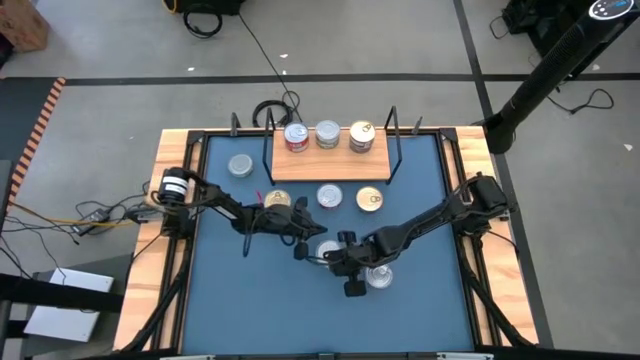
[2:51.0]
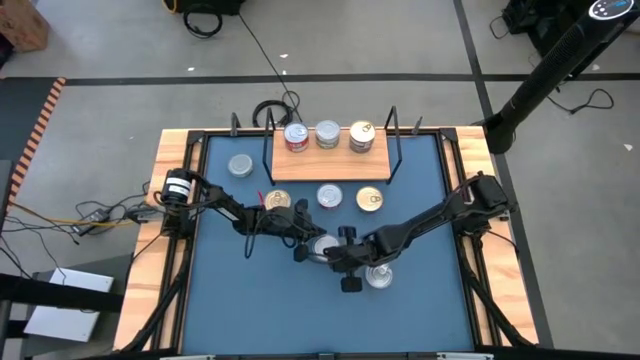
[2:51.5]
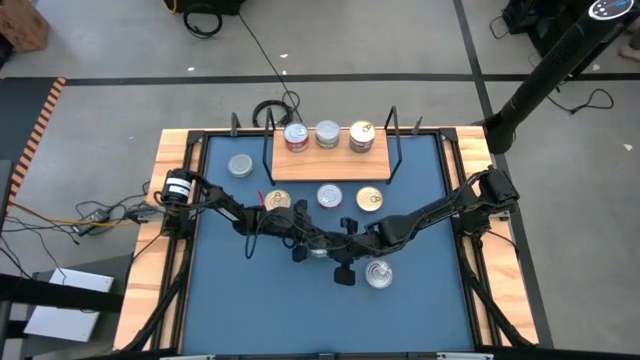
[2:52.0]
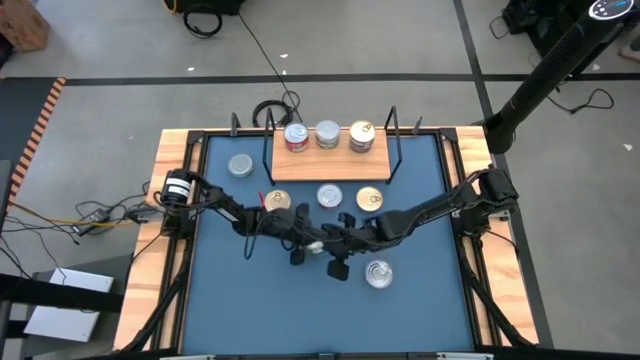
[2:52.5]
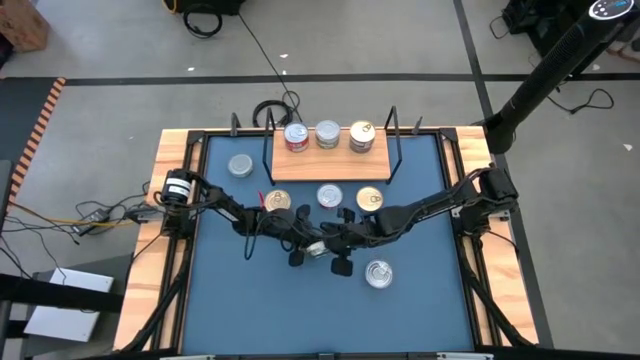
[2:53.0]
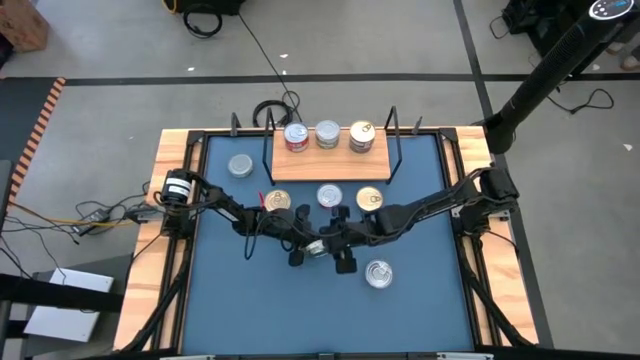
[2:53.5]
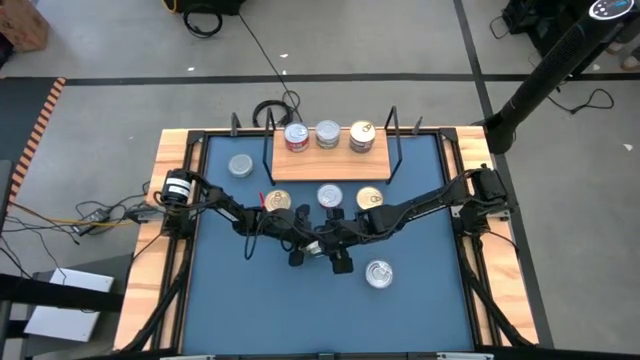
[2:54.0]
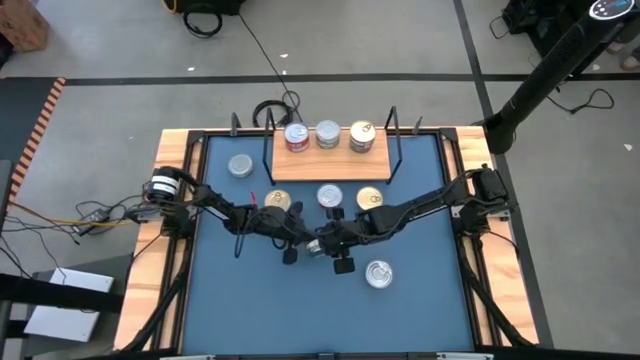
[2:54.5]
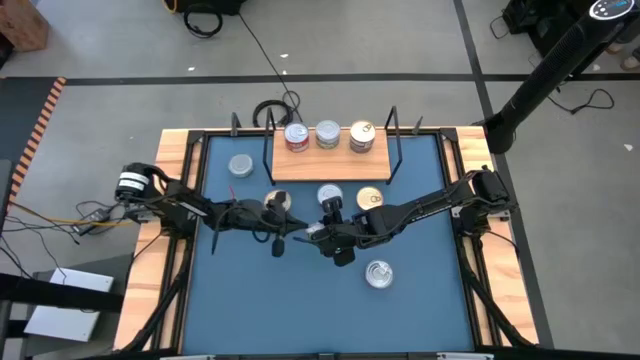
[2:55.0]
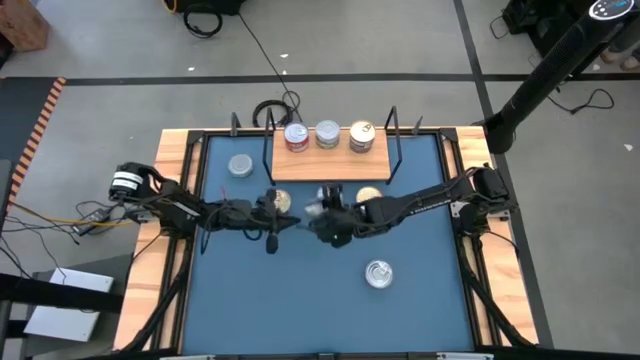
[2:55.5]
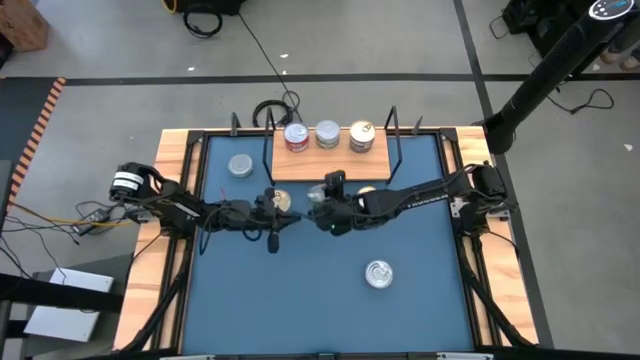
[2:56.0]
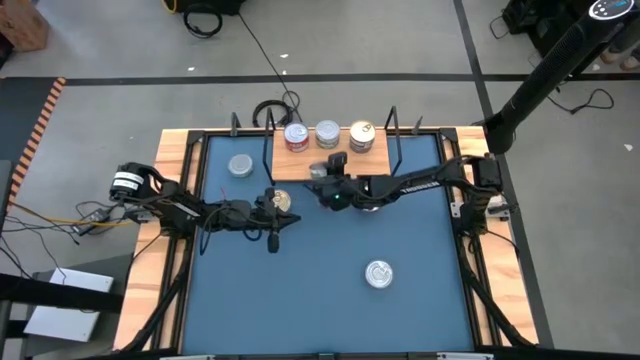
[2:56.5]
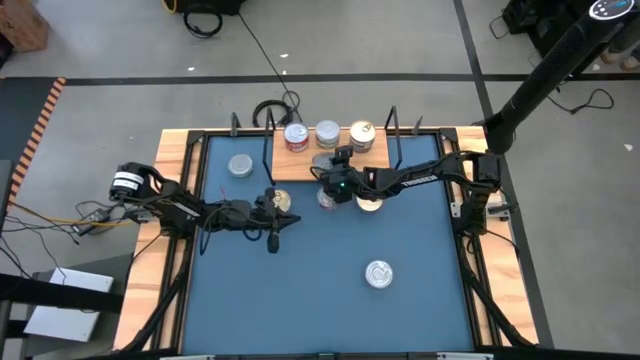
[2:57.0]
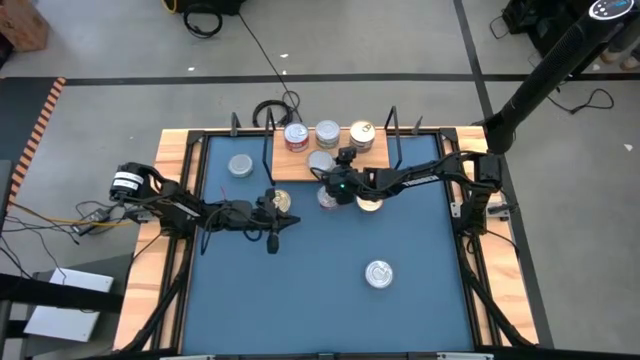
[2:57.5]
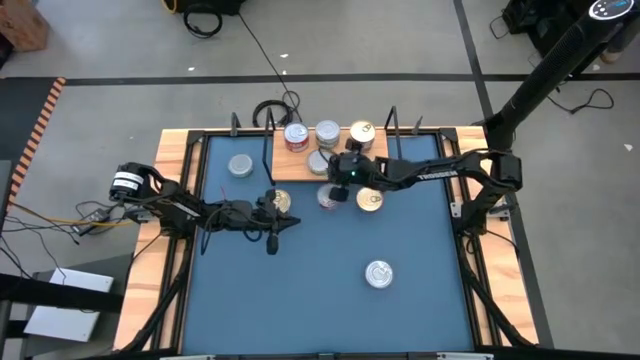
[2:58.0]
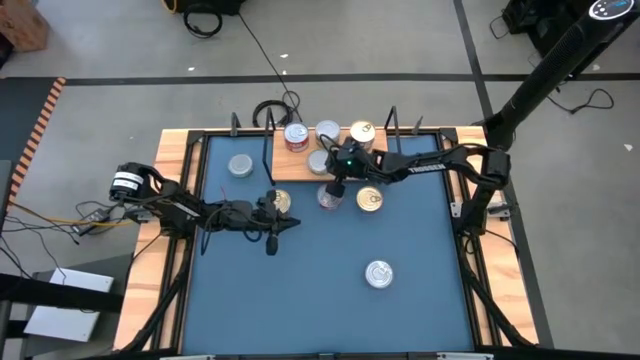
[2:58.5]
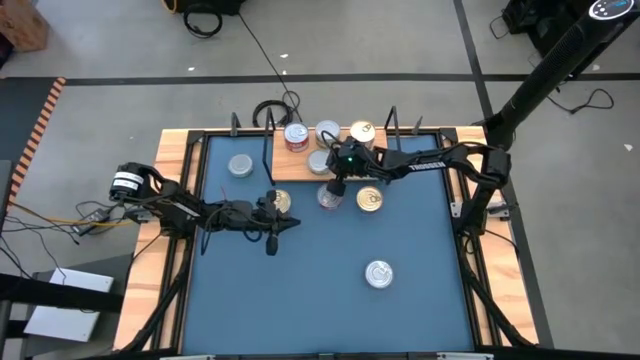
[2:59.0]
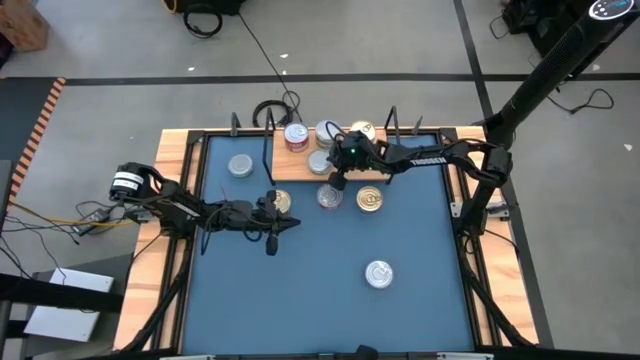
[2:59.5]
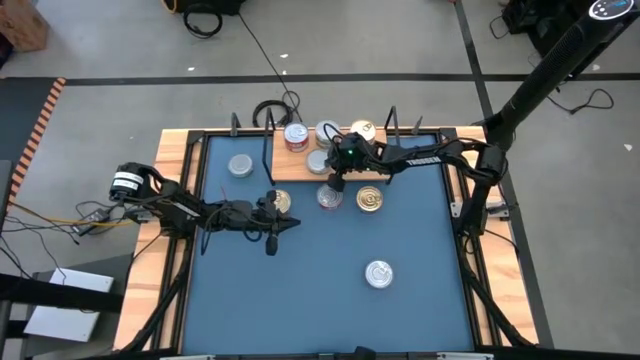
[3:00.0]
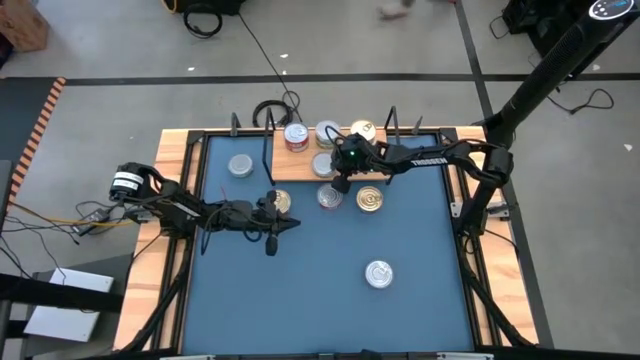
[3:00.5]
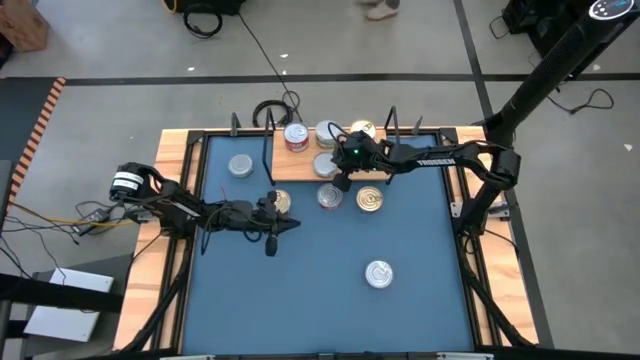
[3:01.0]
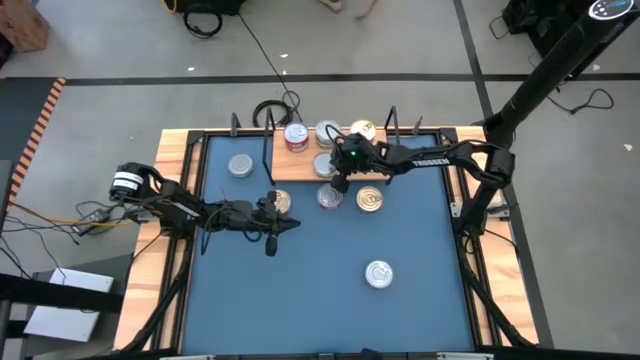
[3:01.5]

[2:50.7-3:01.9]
Task: Stack canned seafood by type on shelf
Put the green tuna can aligned with the stacked green tuna can on the shelf
